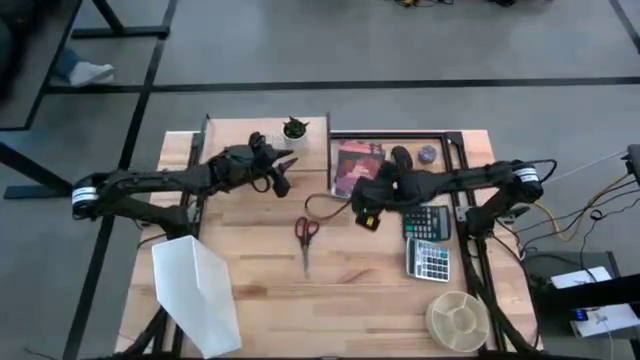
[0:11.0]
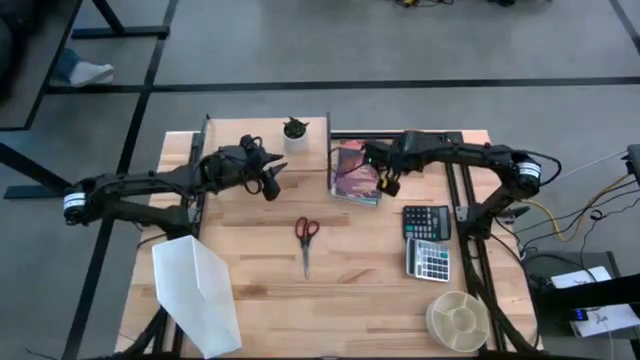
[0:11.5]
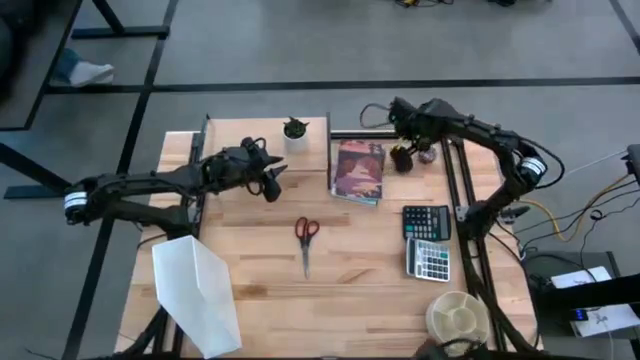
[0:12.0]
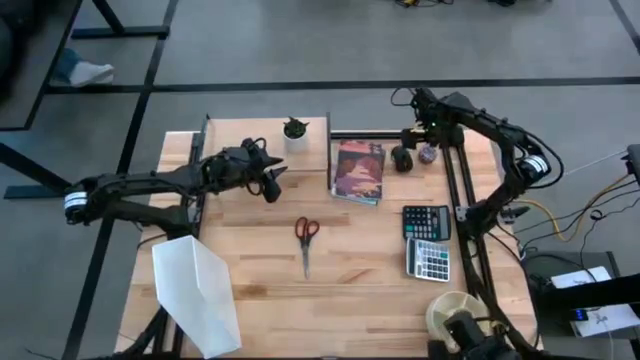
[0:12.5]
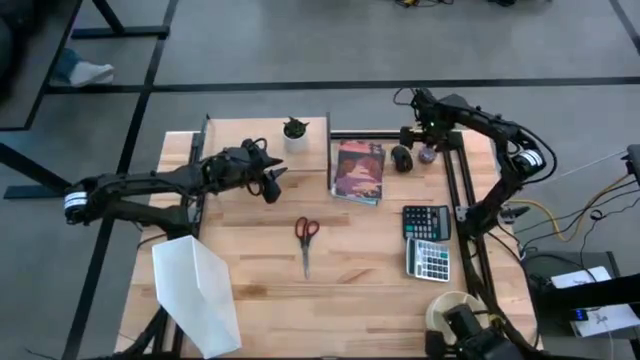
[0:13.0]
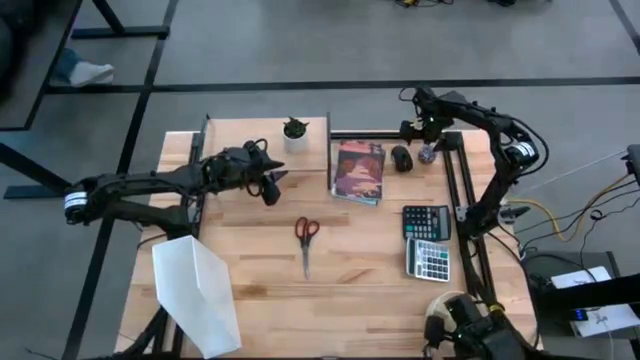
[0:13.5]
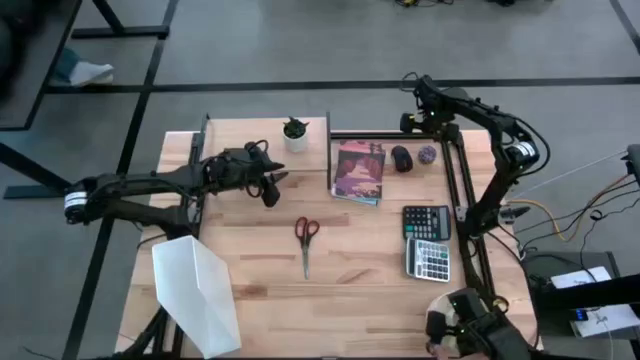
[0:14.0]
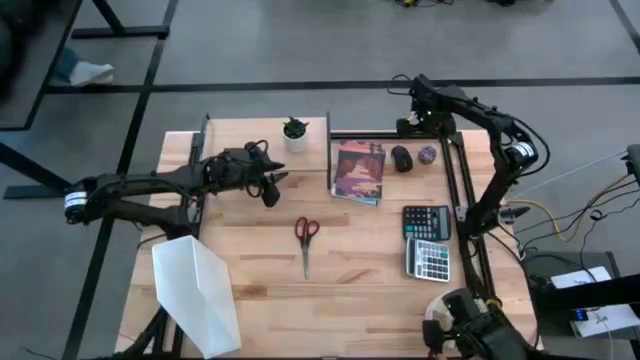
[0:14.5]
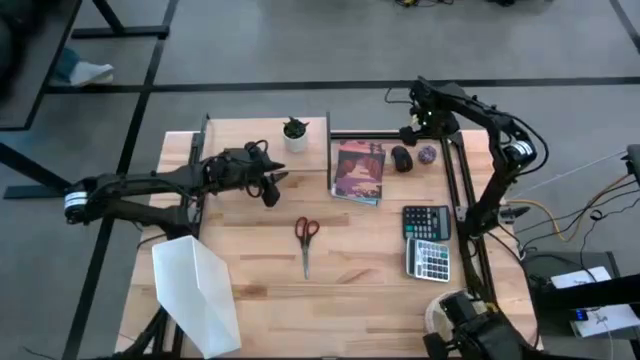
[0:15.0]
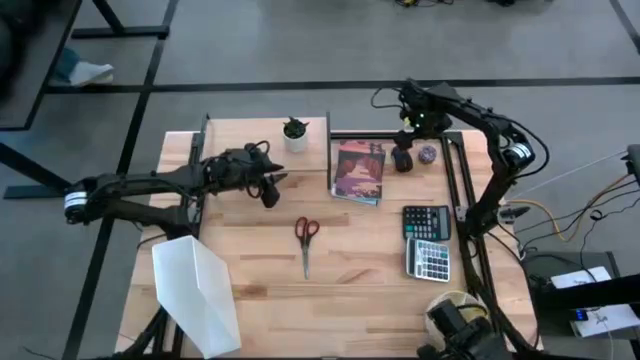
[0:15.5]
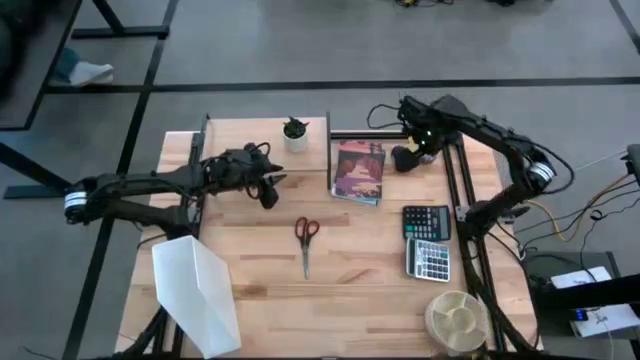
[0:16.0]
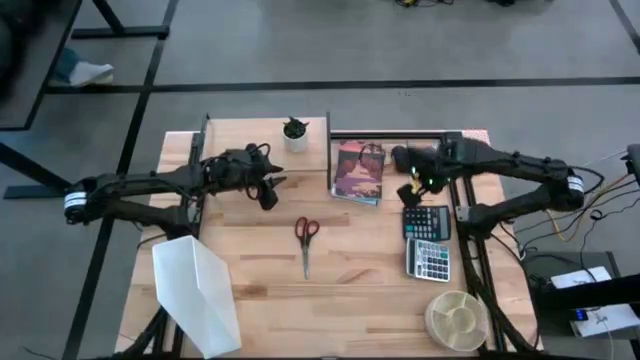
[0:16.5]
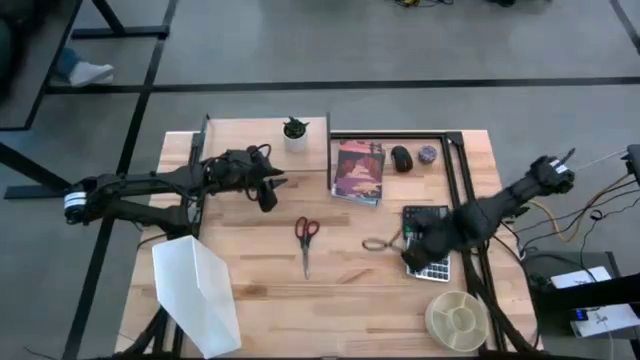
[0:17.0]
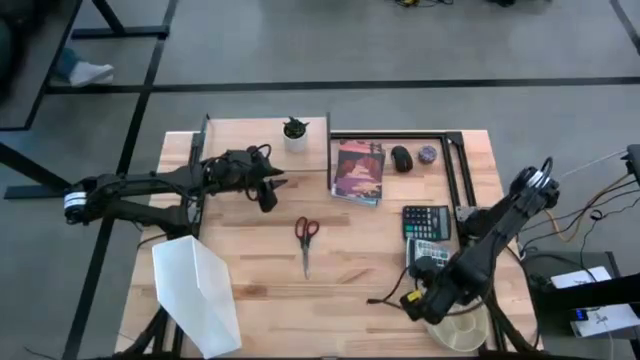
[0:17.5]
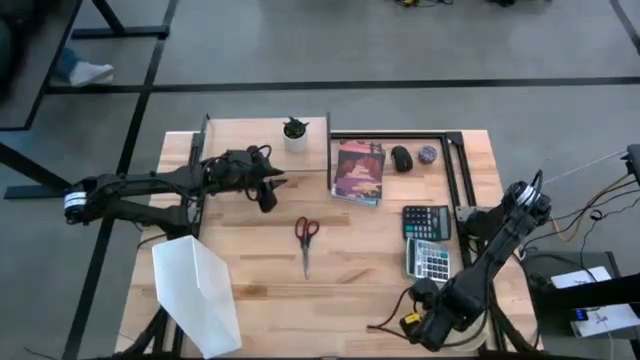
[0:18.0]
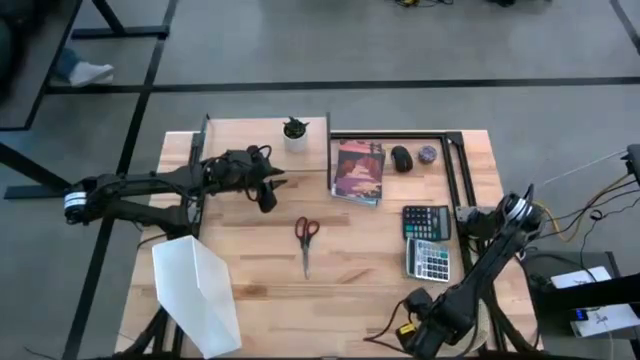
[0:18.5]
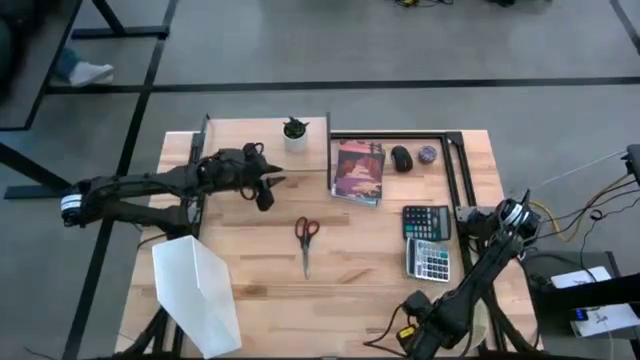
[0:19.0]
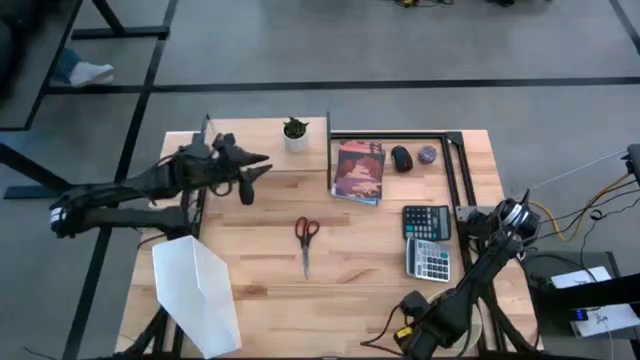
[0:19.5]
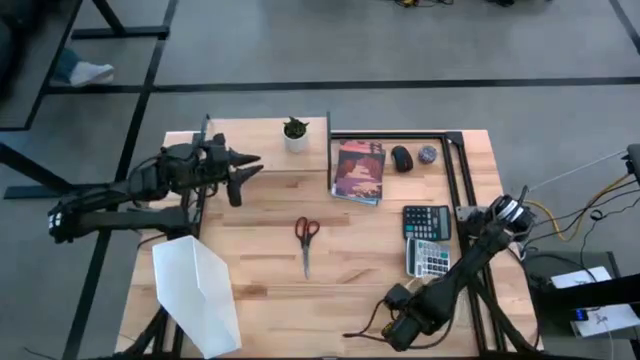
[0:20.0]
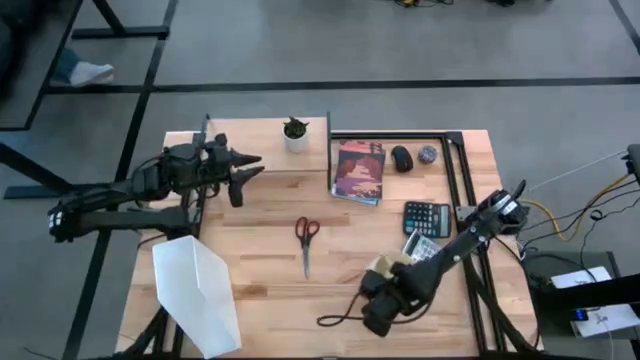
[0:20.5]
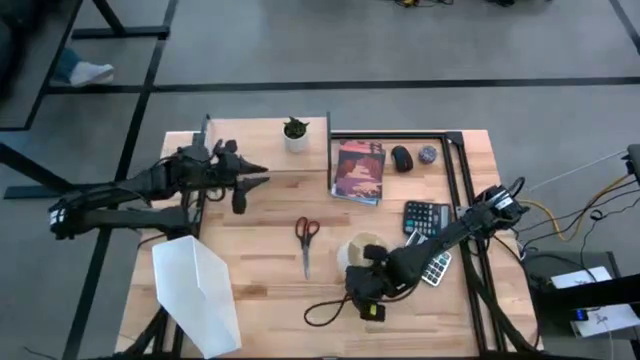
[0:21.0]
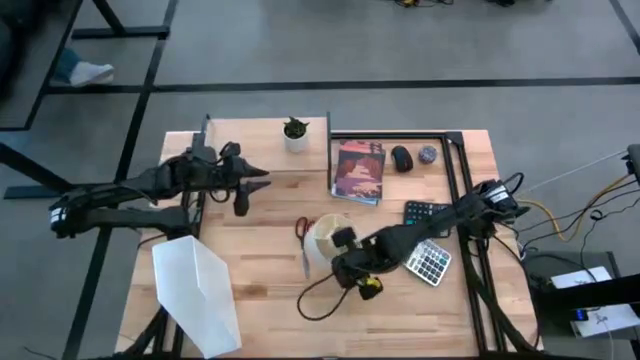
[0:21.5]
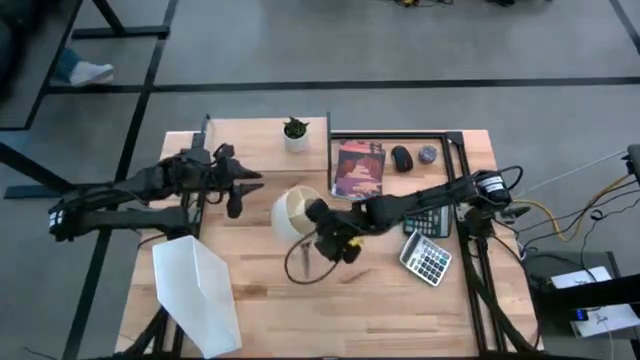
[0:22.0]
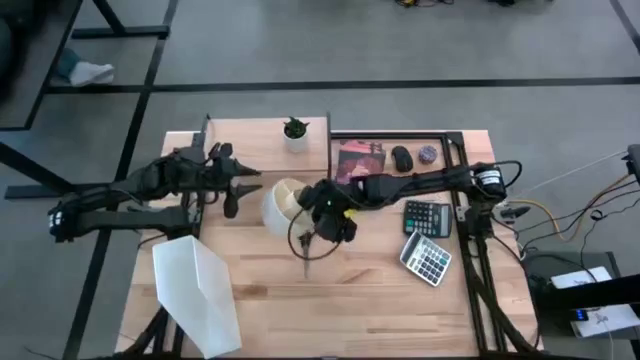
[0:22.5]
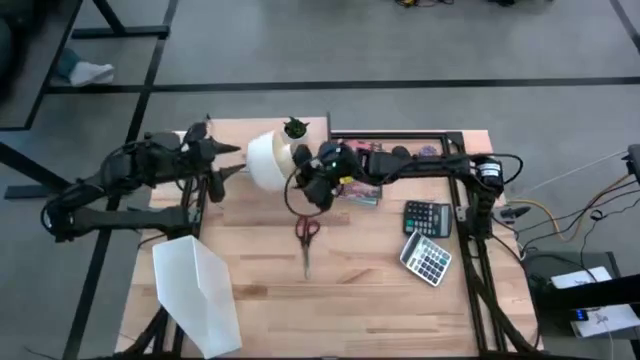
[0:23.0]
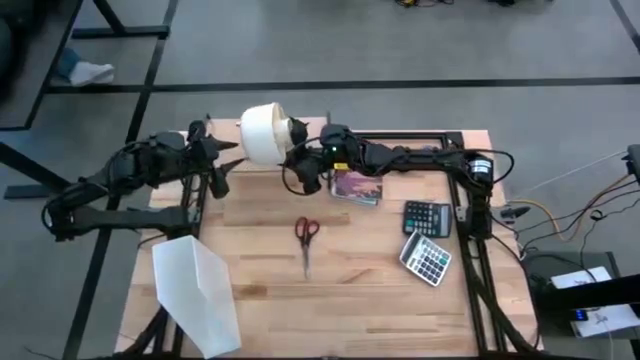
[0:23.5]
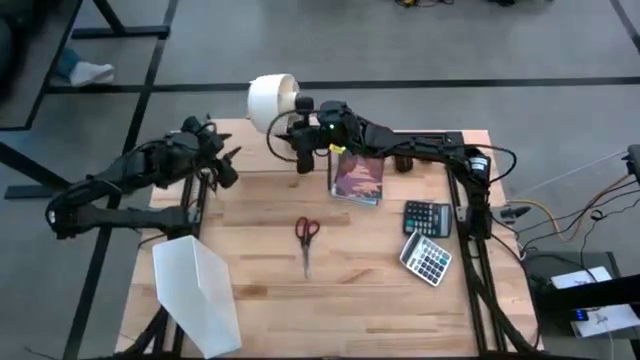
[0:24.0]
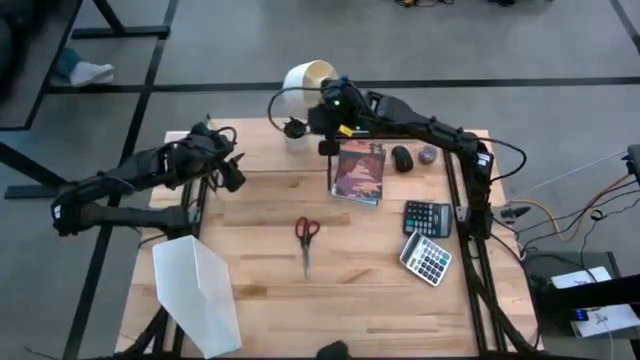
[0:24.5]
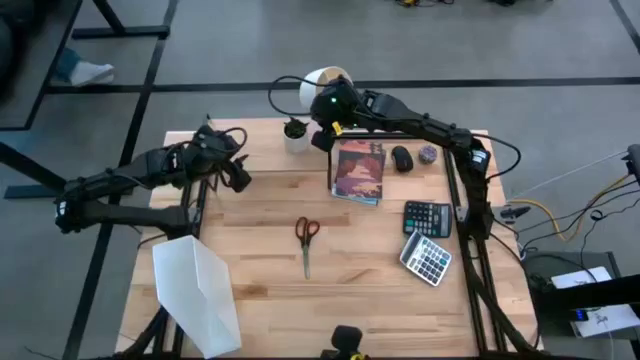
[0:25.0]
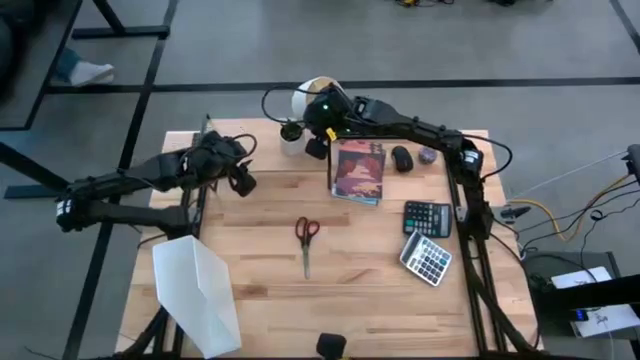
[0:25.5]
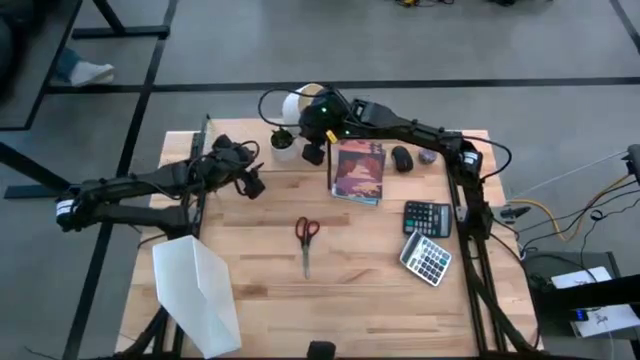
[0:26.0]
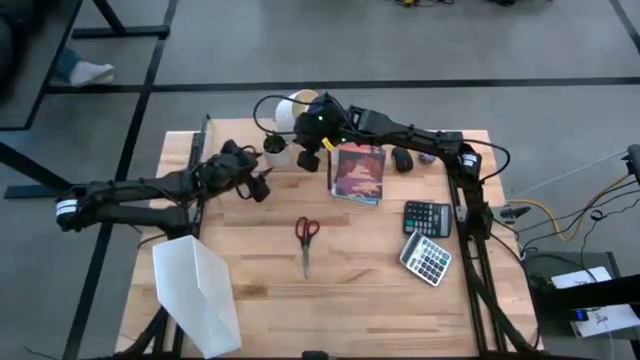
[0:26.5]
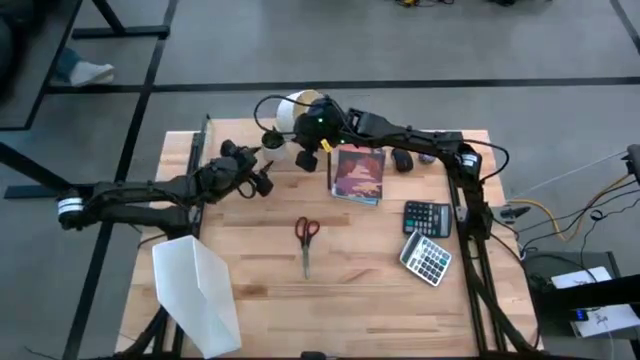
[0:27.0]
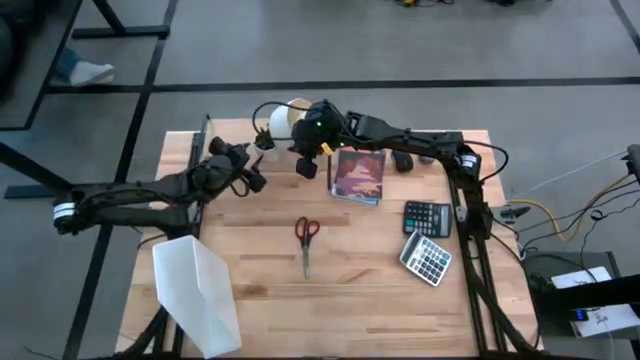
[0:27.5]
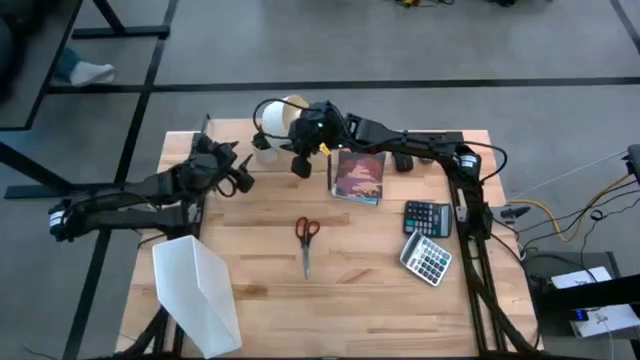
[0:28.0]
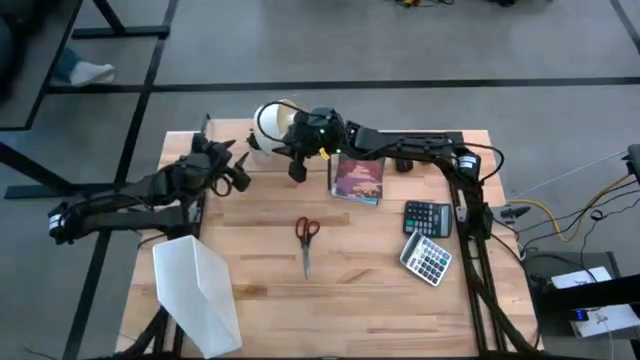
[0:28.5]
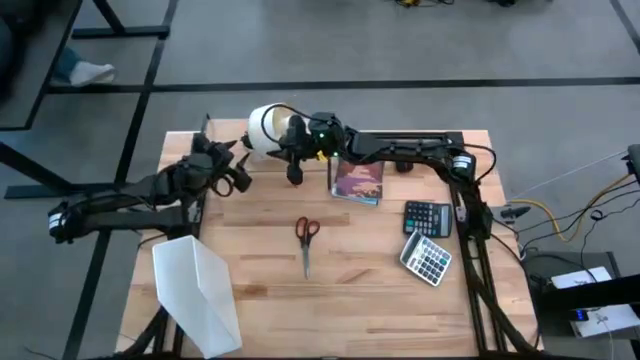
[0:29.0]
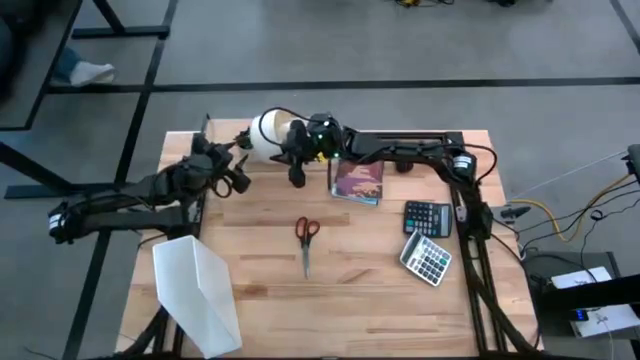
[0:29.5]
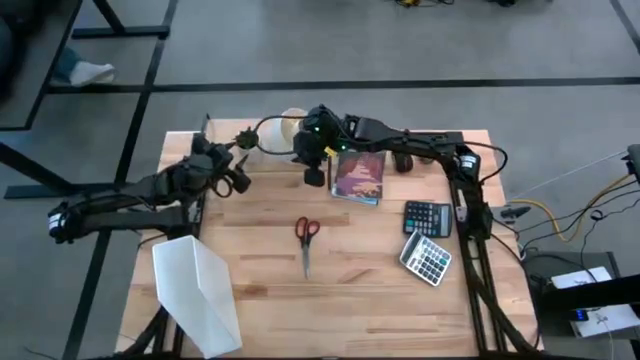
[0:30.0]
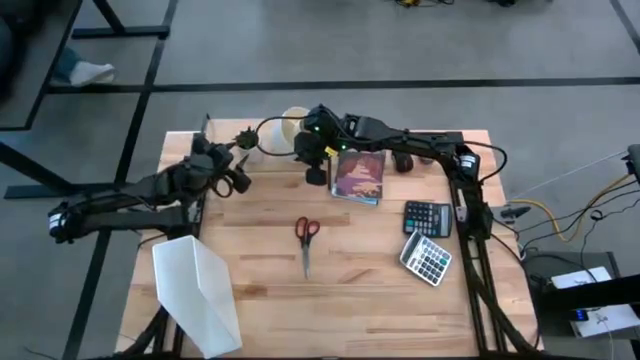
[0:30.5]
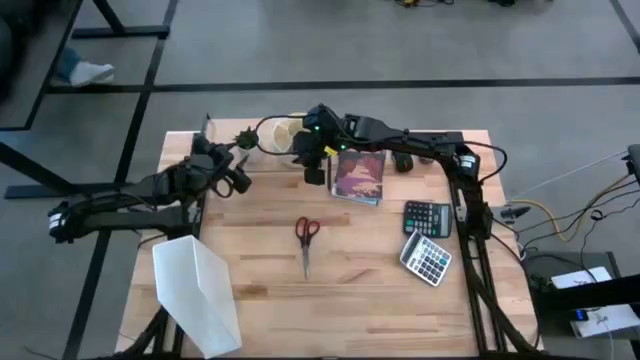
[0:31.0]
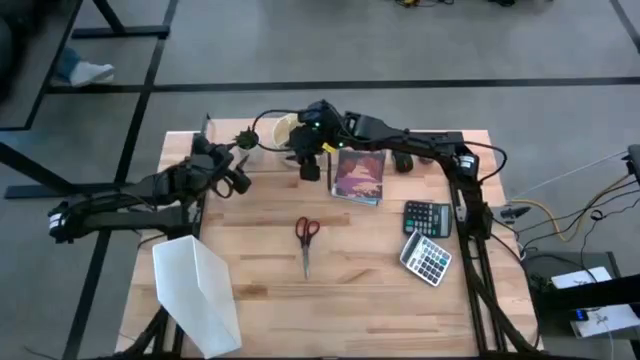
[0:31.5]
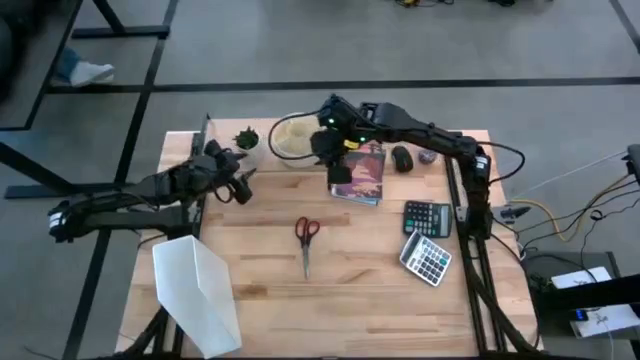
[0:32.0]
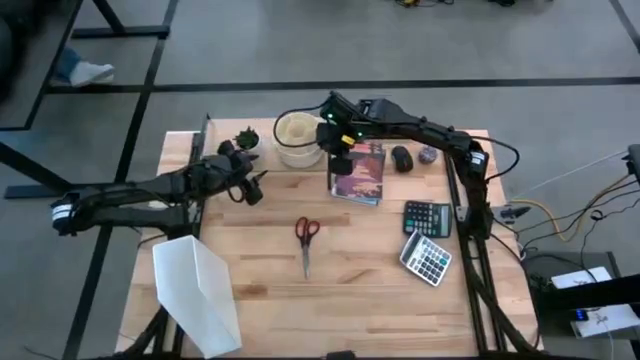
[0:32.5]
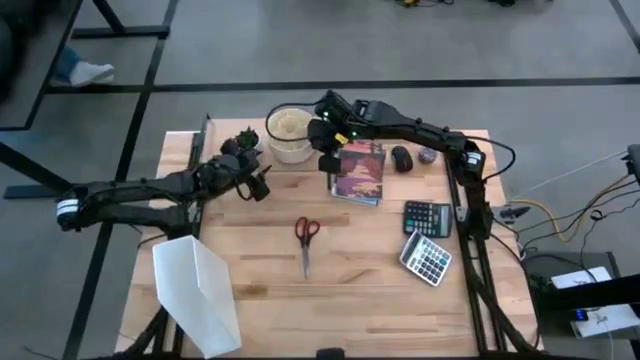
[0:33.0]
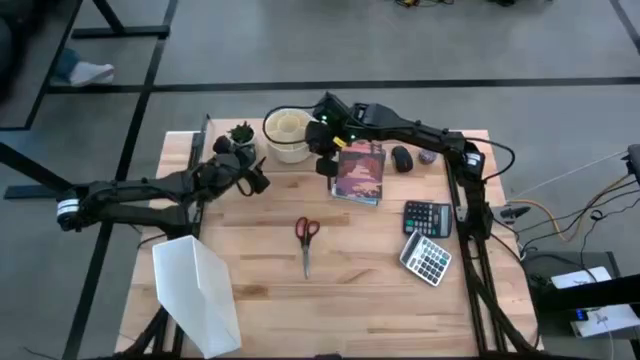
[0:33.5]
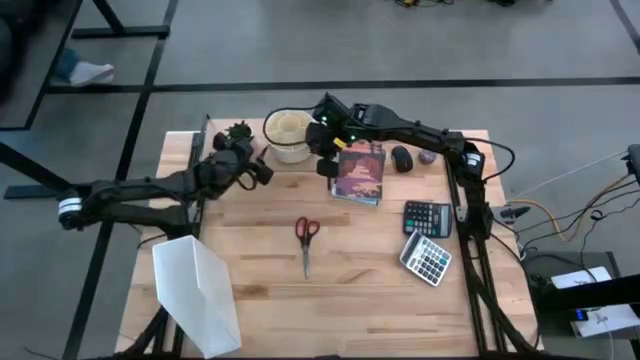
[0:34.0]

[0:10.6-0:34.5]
Task: Stock shelves
Put the white pen organizer on the shelf
